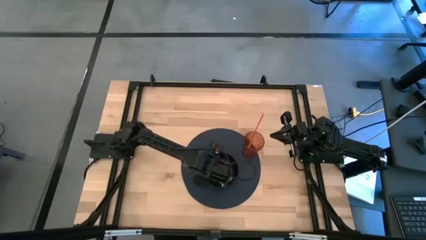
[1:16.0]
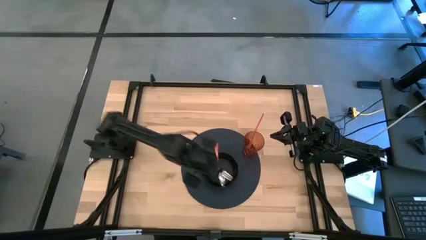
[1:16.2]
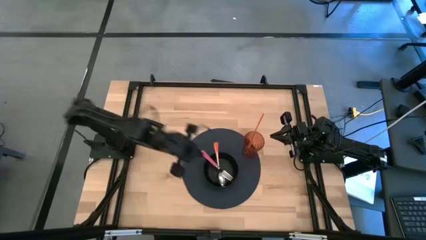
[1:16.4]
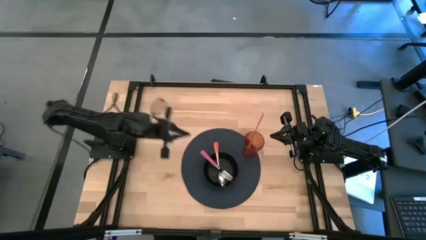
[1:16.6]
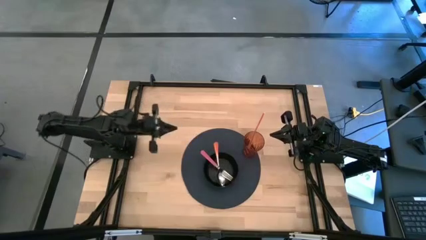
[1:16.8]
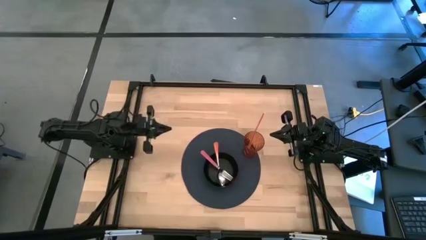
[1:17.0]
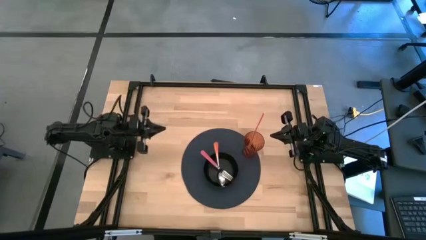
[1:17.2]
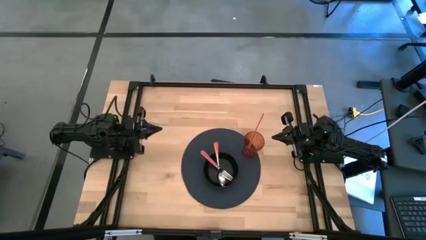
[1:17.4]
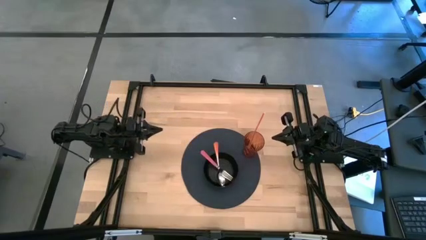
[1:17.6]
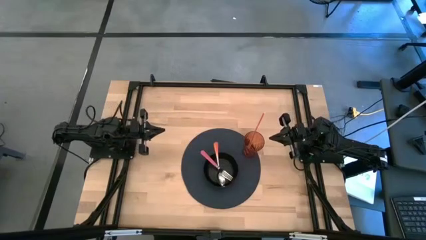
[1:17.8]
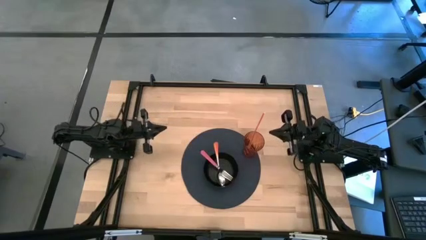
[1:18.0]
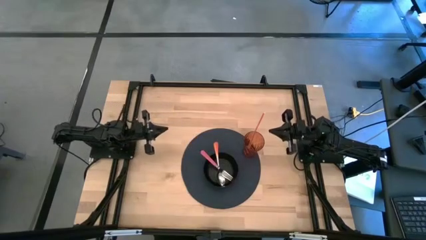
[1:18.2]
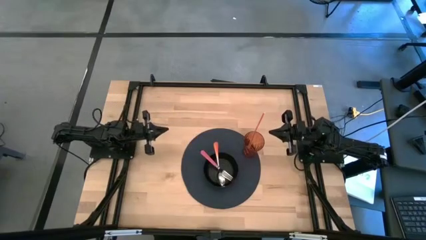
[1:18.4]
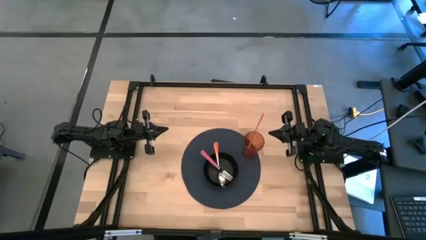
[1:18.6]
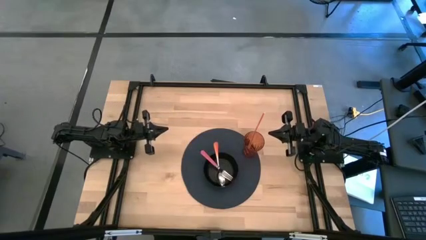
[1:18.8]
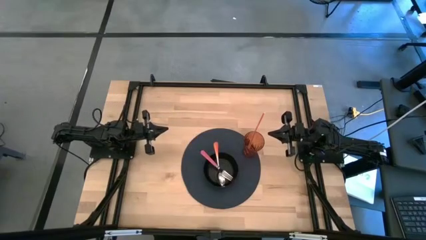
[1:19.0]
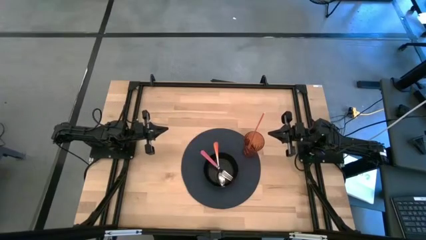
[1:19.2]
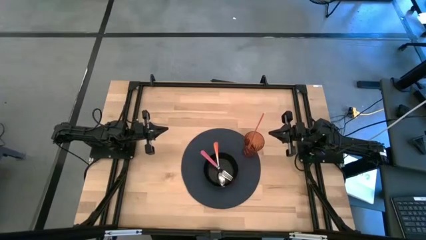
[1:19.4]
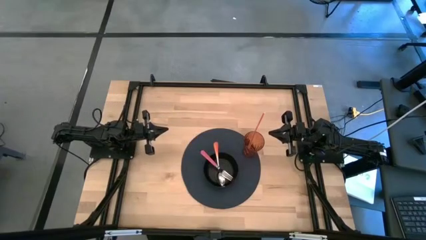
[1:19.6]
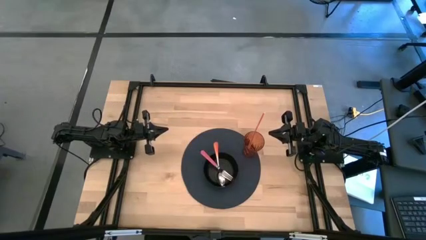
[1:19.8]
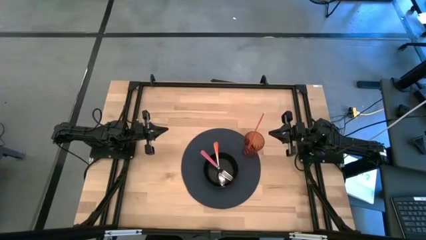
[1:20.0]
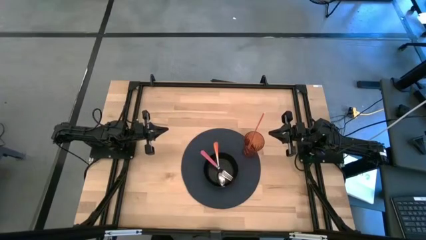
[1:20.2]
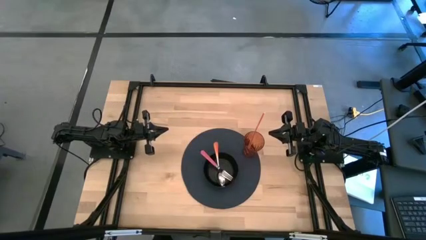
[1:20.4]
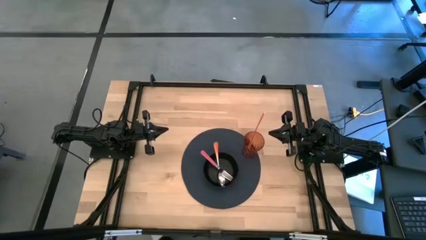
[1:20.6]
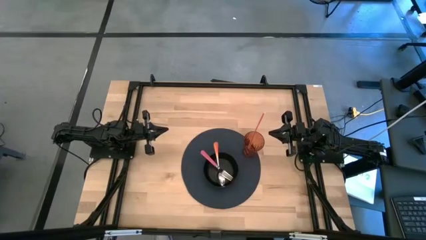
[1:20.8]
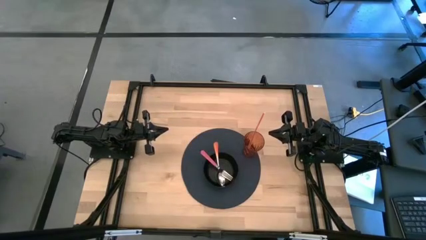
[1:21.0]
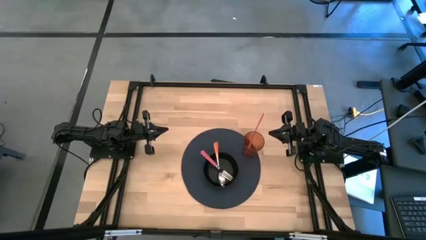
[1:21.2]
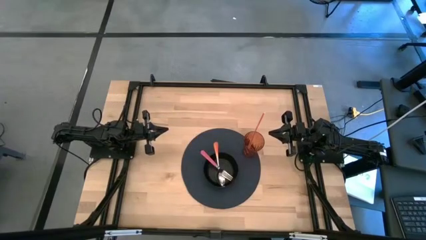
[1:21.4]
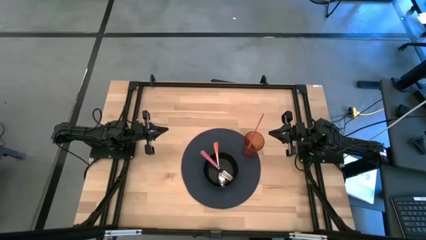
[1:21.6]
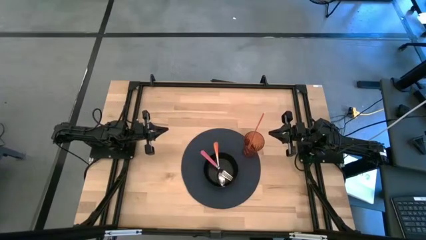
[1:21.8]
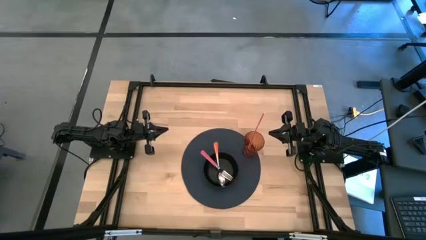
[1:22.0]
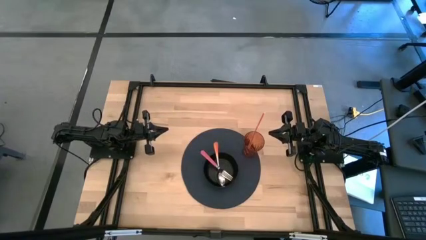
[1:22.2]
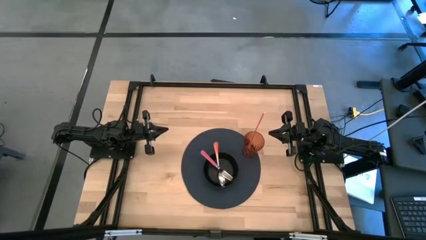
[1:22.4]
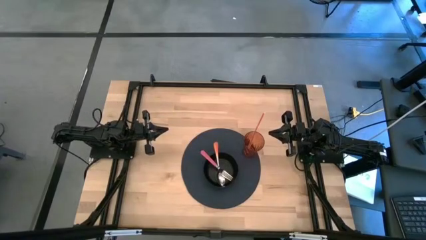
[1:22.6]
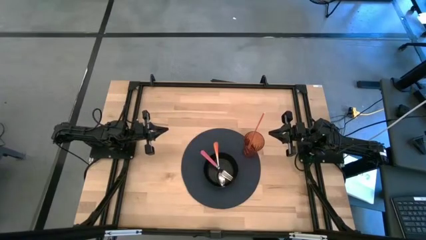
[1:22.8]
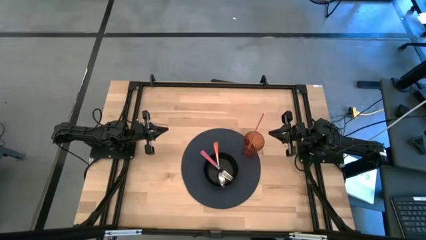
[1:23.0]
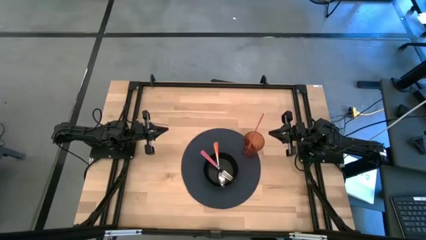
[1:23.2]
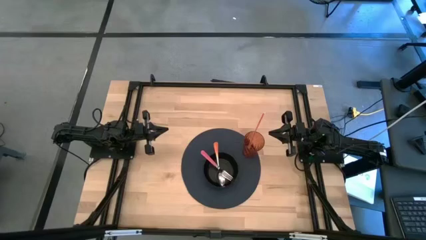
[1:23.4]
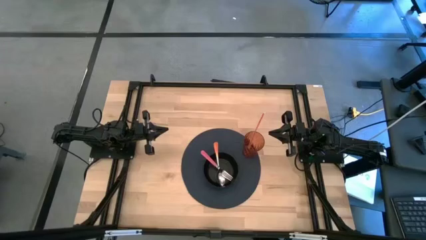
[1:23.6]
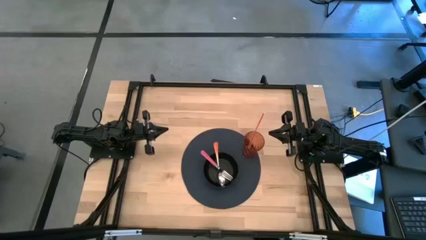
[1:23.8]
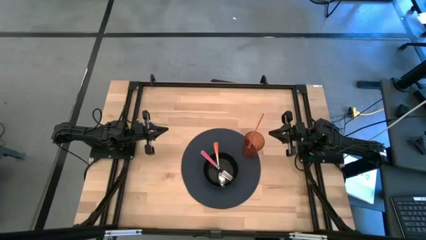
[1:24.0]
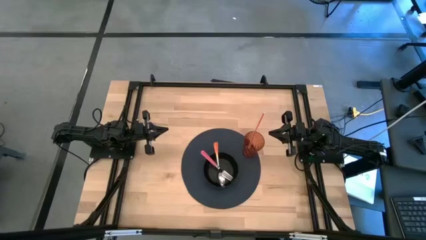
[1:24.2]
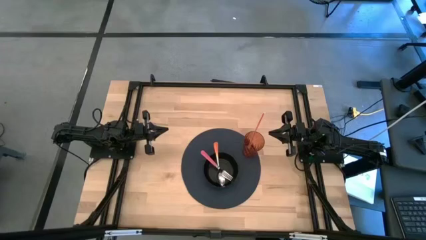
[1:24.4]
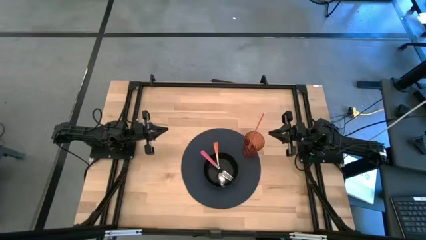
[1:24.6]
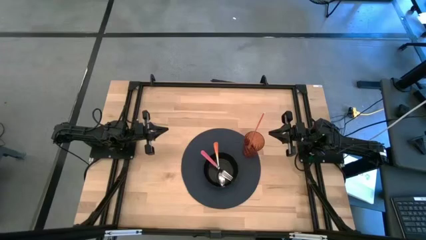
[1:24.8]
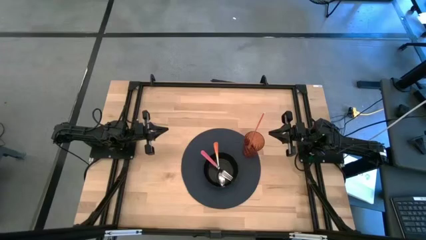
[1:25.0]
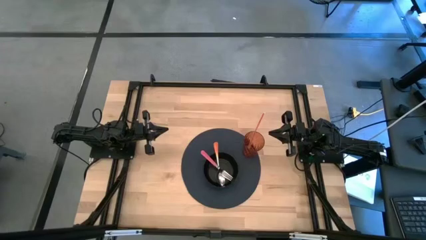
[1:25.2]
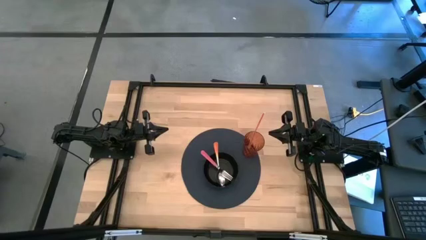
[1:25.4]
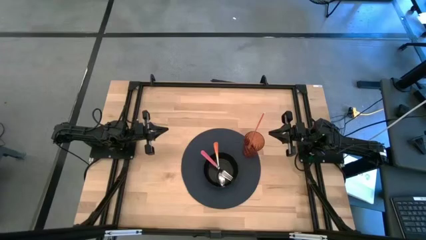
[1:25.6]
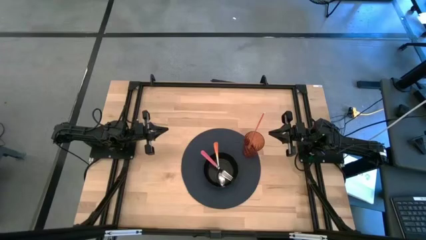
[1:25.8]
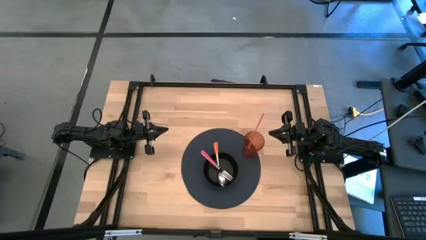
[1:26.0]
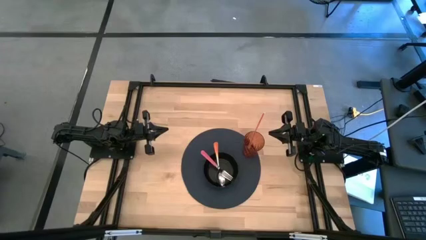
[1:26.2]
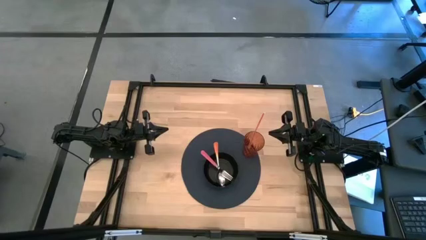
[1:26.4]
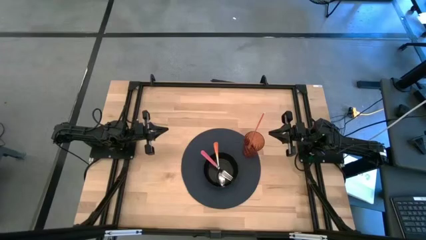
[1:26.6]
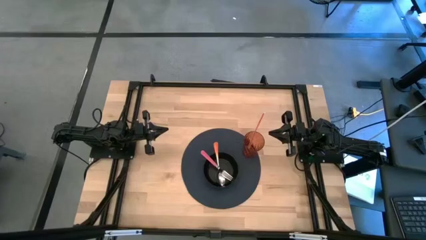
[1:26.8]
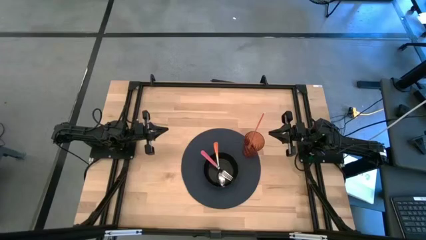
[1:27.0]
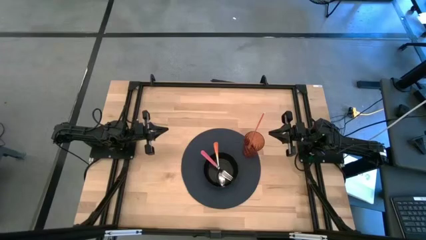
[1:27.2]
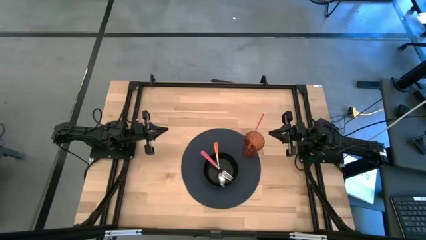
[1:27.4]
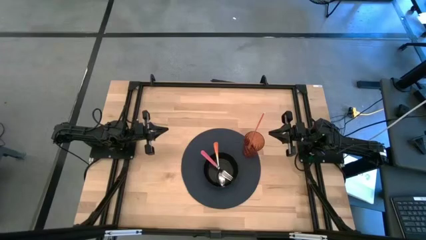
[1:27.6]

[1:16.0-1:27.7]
Task: Pick & Place Utensil
Return to Home Position

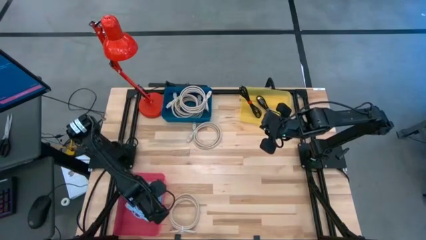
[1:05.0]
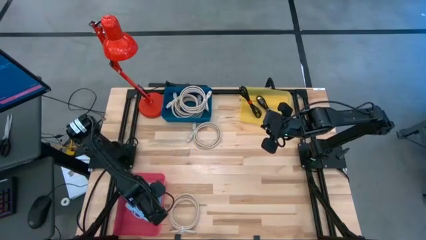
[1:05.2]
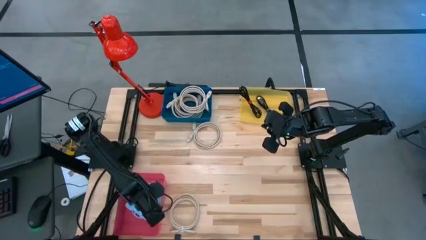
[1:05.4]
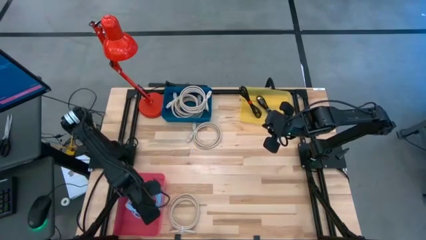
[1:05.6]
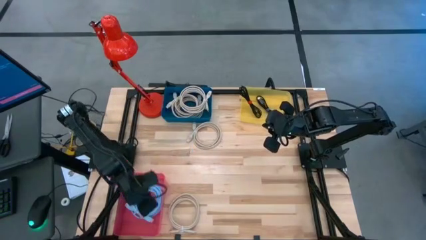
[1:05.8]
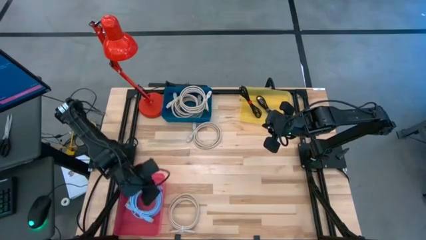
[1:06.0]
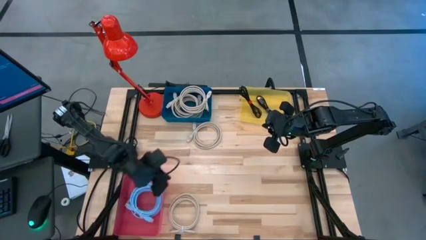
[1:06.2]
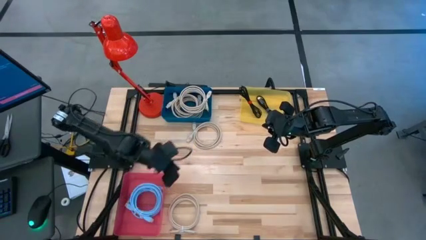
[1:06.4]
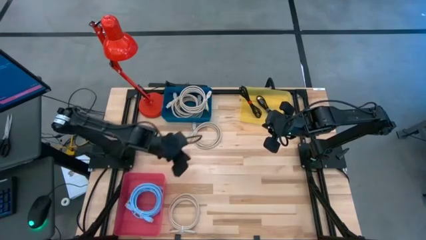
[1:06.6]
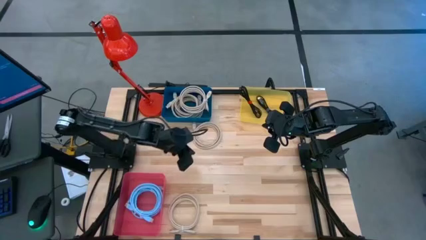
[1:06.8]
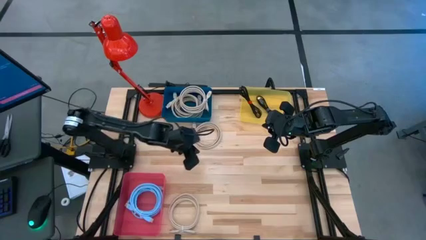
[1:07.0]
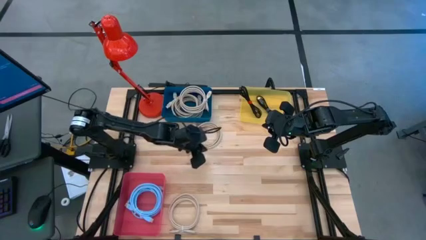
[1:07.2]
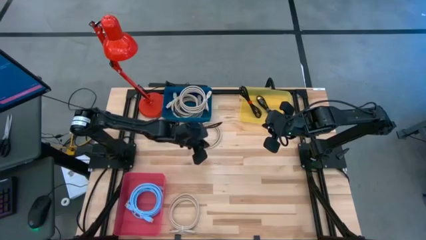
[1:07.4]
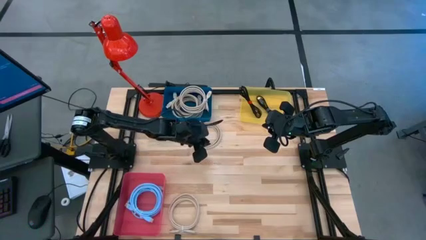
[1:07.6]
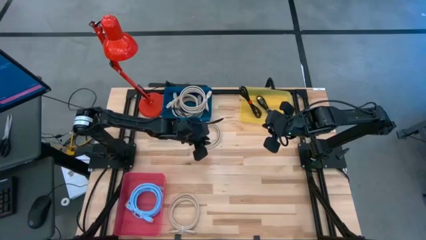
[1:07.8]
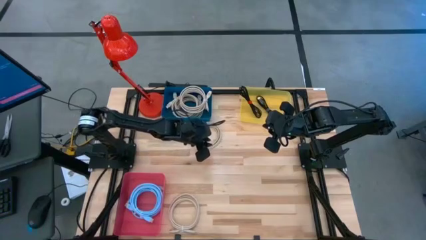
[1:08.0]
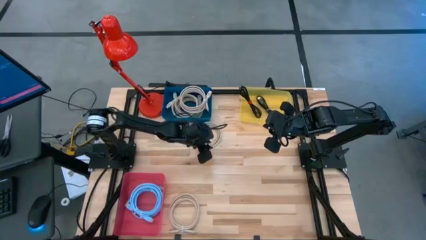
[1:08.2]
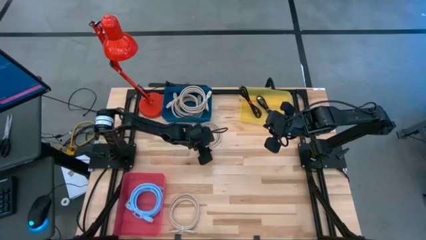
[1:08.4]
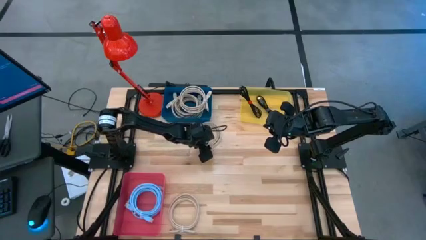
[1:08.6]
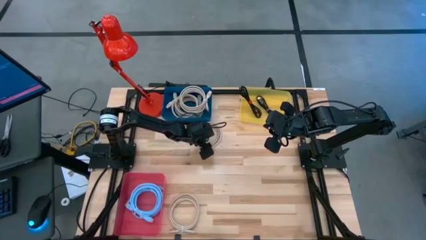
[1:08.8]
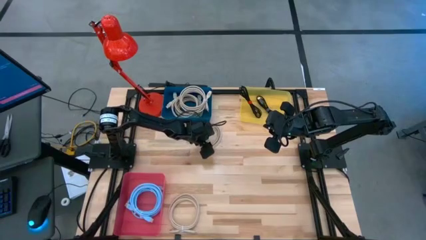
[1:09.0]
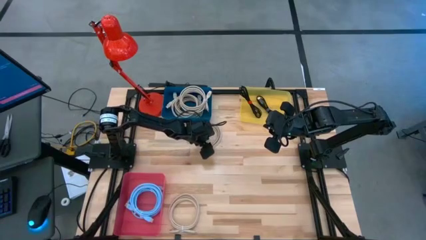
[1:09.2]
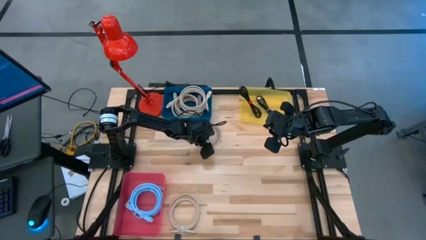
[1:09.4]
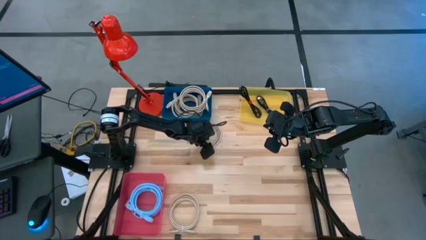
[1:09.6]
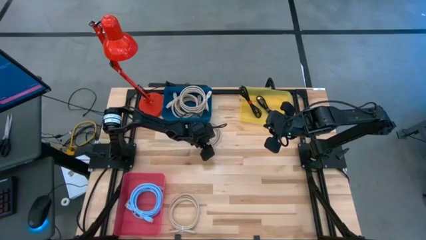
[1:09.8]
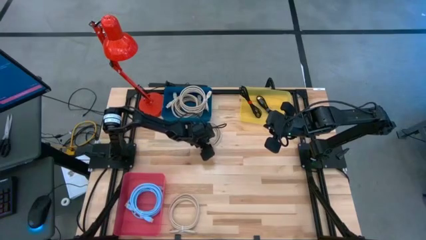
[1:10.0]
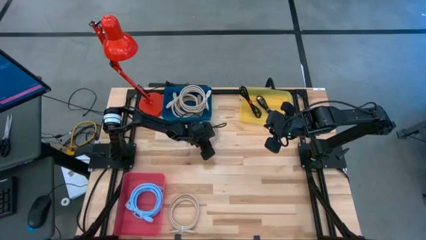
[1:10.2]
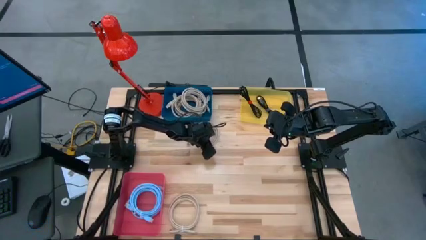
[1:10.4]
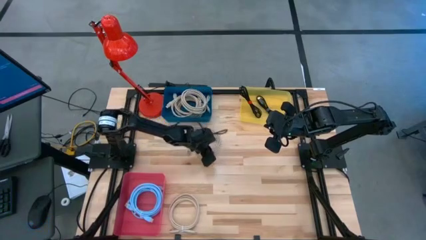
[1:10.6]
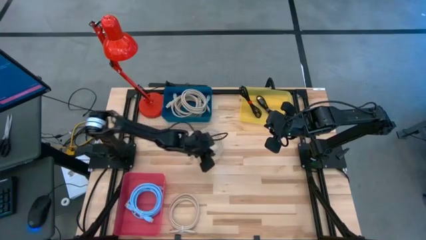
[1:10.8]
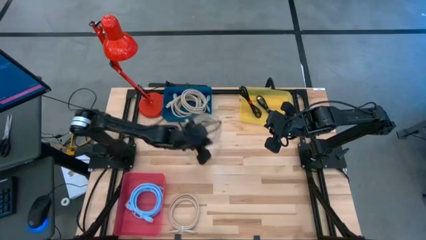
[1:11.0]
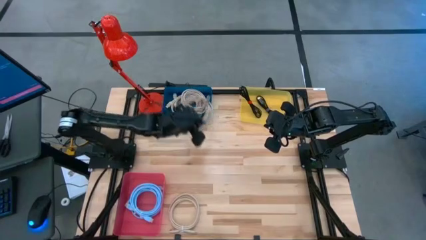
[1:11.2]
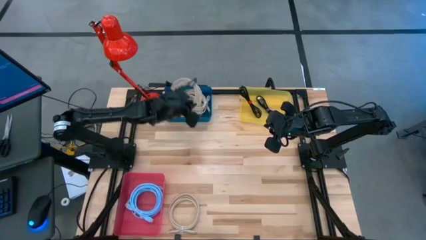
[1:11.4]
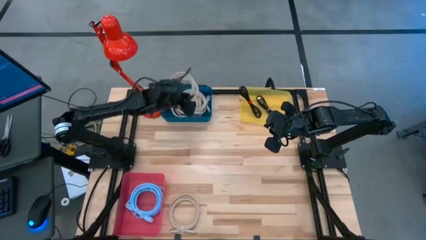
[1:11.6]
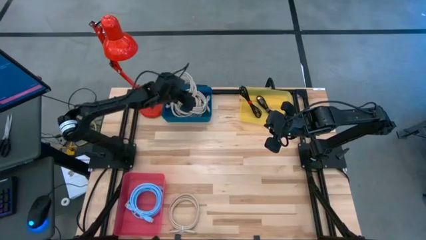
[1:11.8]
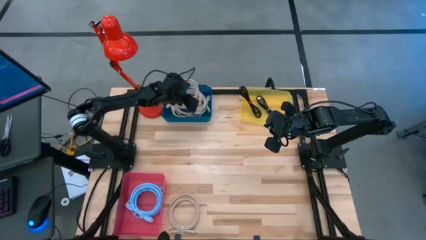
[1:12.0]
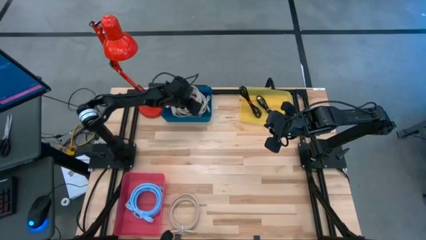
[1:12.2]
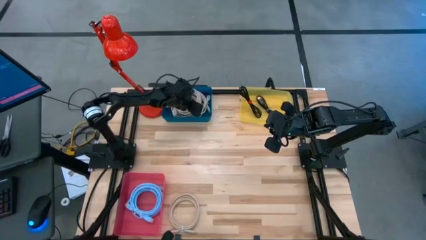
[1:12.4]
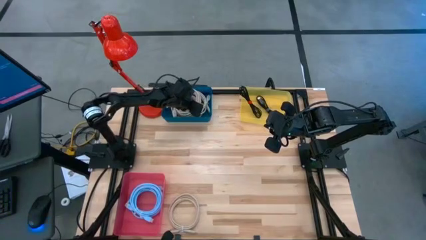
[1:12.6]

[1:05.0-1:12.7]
Task: Pick & Place USB Port
Put the brown display cable into the blue bin
